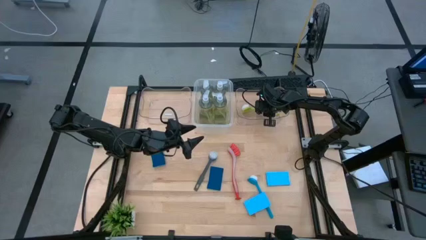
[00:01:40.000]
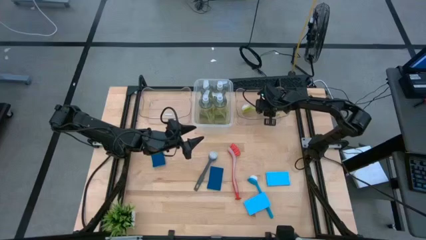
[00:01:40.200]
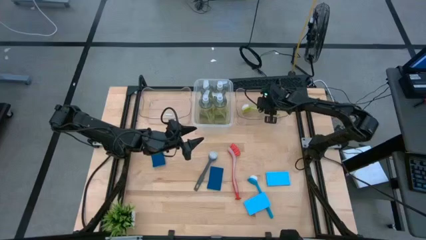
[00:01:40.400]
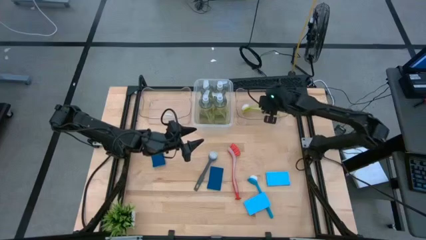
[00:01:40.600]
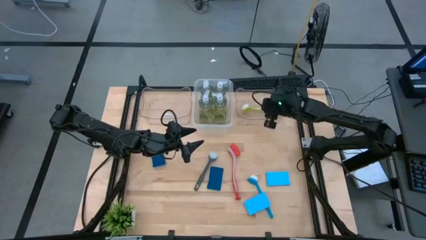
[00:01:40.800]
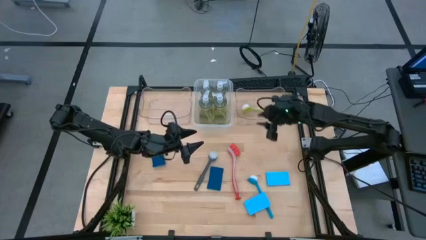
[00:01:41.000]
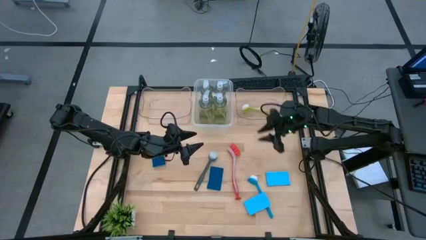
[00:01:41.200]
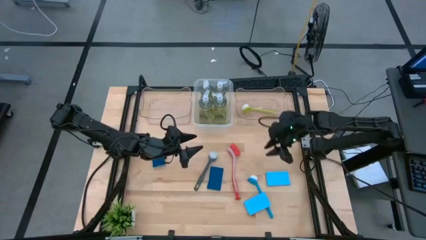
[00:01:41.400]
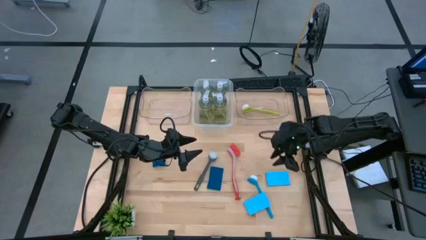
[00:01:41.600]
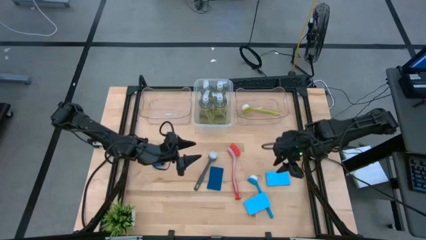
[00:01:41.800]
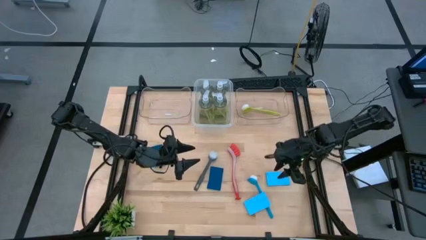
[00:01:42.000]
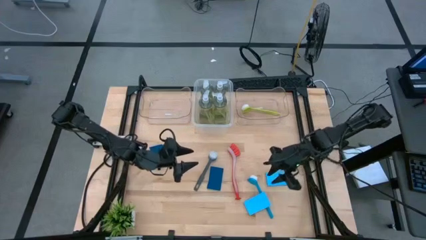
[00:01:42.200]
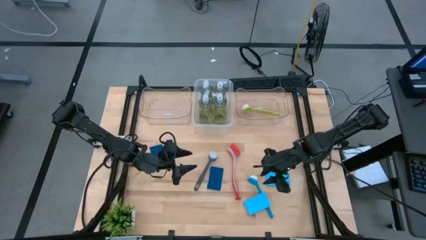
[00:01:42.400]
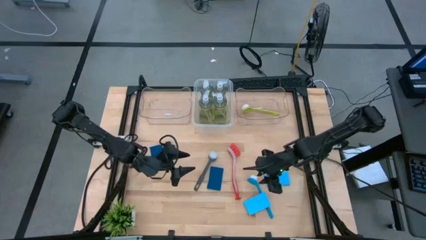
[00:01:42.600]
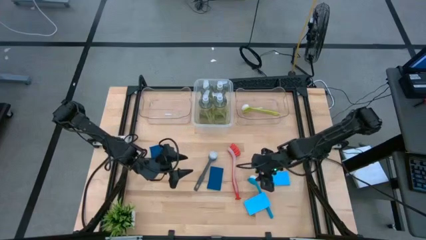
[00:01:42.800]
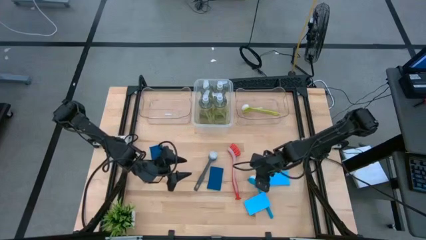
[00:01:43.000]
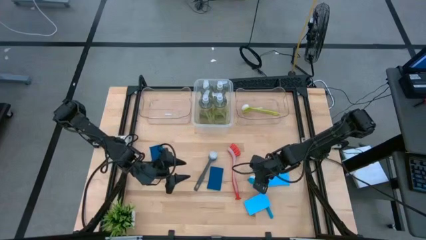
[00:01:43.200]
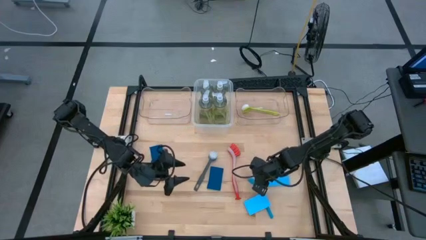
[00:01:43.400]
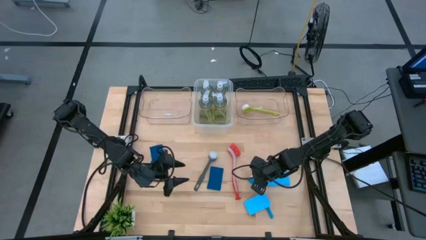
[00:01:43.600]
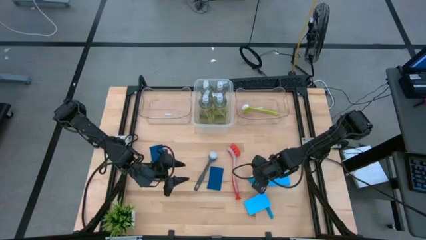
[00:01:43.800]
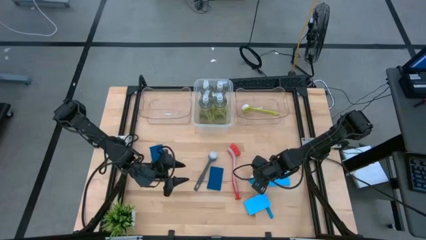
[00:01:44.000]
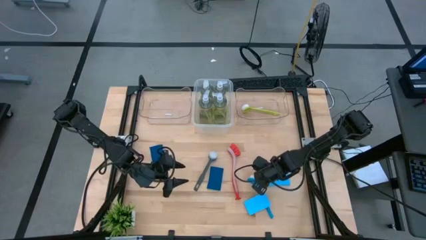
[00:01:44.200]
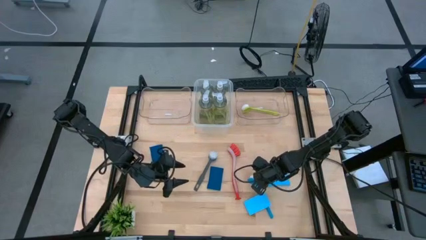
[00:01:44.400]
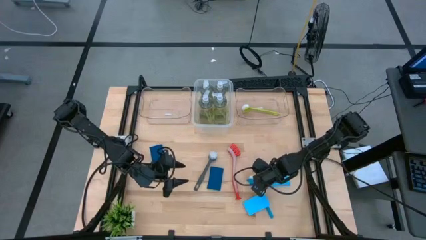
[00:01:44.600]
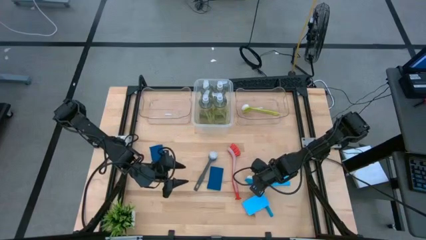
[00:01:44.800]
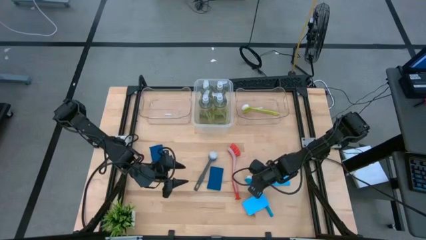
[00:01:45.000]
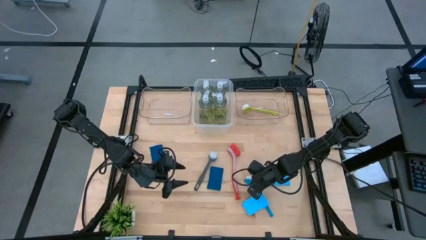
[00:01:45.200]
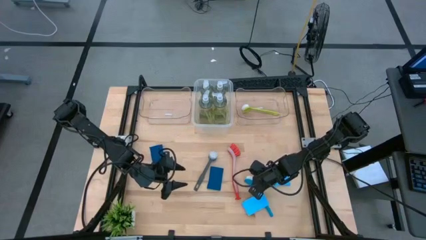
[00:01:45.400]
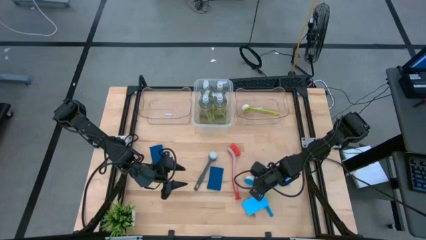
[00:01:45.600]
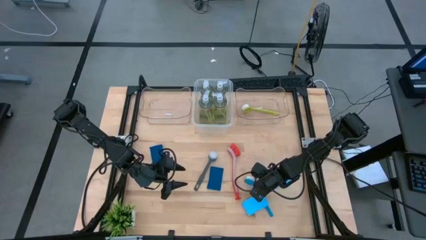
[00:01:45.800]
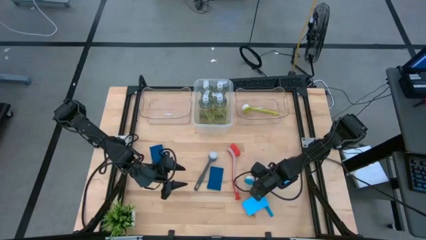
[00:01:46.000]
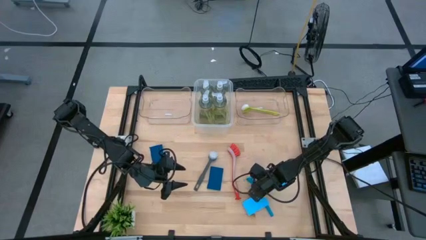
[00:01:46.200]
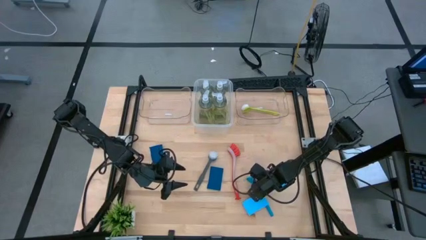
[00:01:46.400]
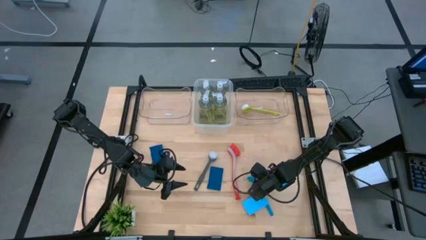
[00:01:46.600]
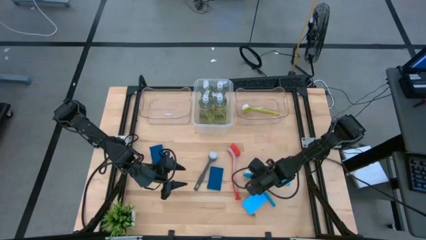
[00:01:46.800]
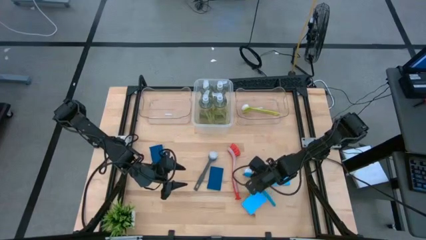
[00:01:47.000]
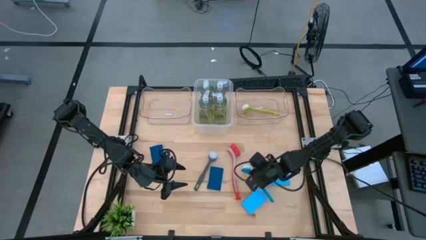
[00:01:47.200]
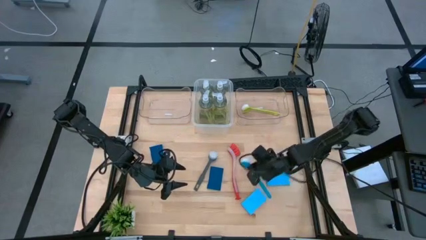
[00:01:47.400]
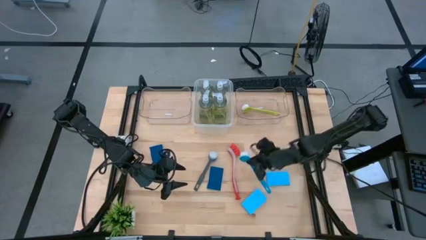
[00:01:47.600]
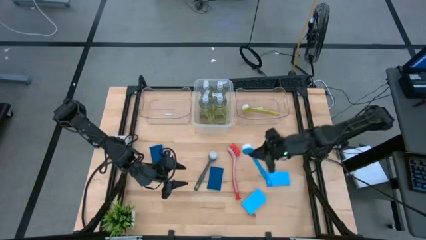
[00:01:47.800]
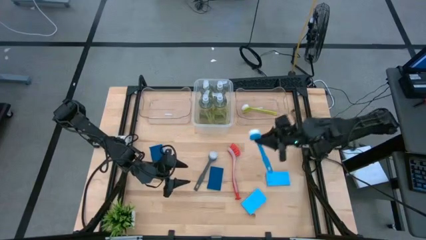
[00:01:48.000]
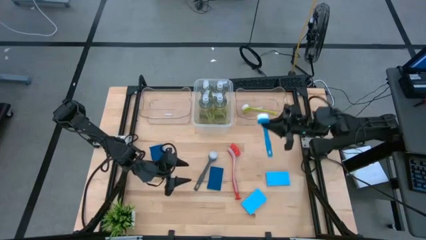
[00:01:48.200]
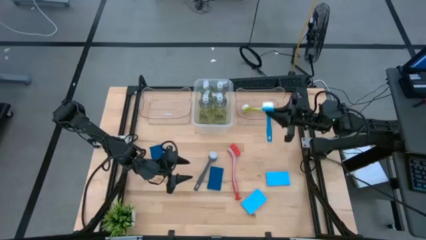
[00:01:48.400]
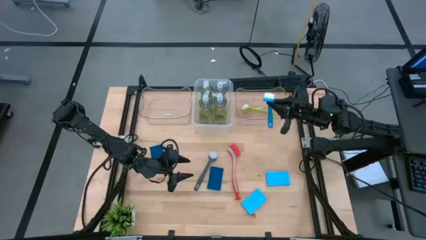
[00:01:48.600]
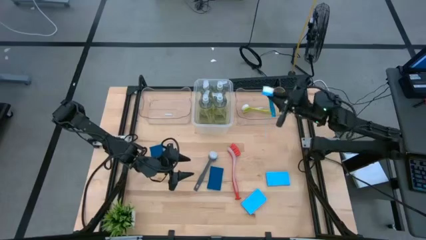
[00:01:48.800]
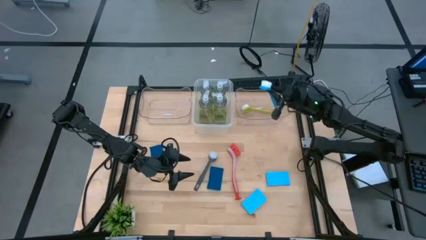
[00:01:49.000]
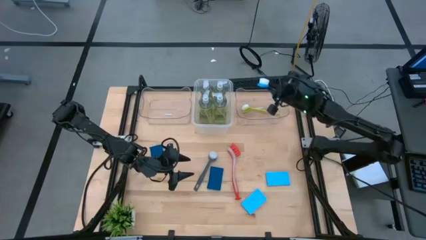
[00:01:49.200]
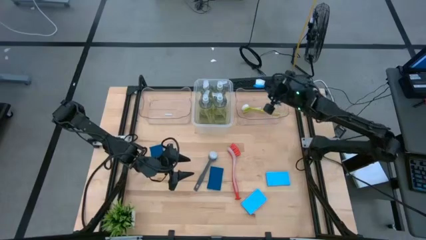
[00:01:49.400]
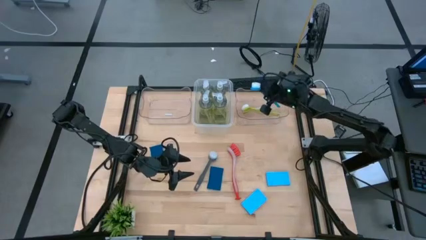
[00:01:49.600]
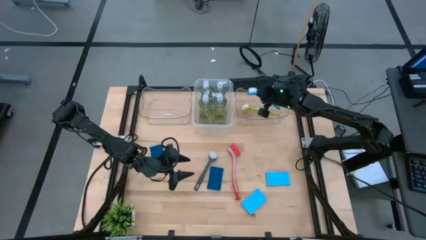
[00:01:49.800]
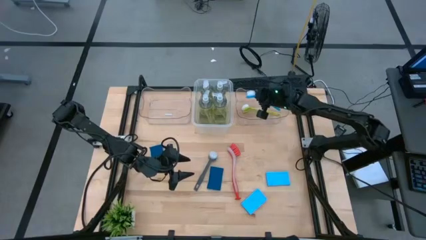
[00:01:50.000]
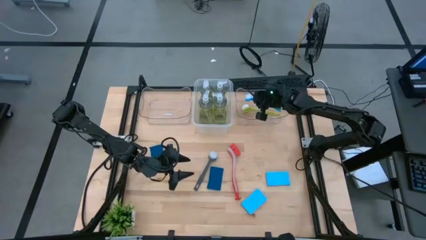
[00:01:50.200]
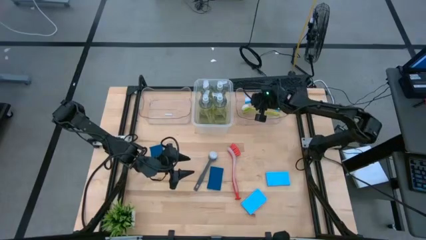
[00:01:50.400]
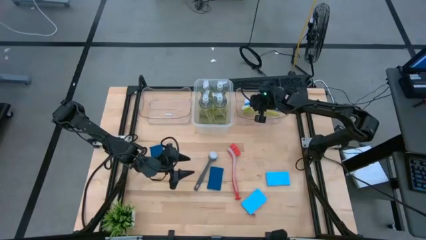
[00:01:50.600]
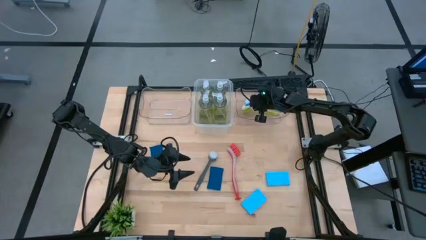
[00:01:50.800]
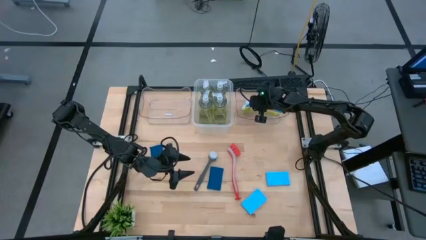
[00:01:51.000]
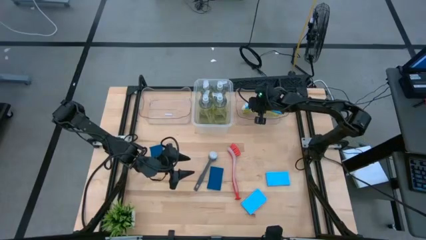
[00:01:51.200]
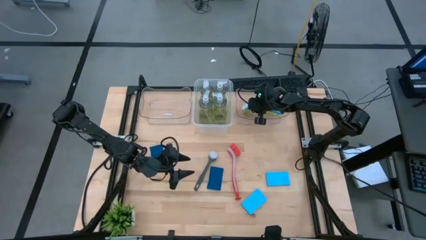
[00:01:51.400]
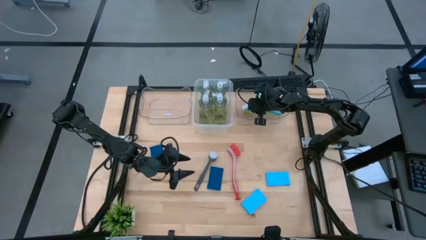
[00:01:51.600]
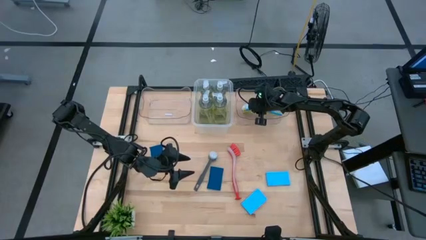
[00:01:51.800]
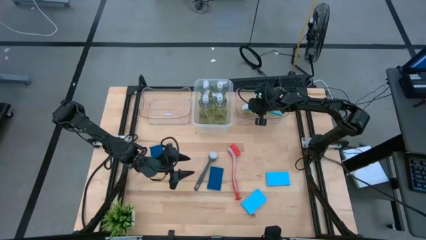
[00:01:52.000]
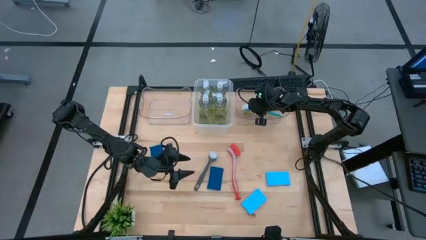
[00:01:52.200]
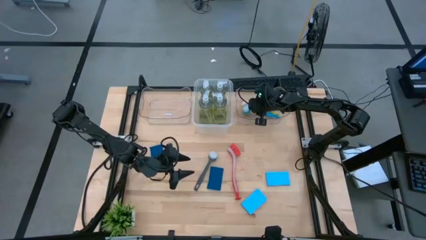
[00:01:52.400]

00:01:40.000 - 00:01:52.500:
Task: Pick & Place Kitchen Sink Supplies
Put the blue dish brush into the right transparent bin

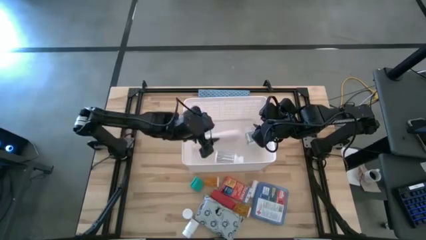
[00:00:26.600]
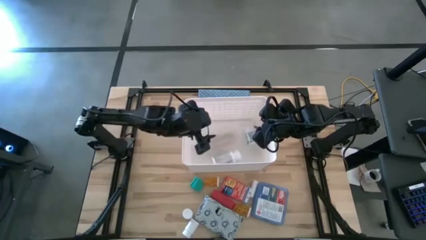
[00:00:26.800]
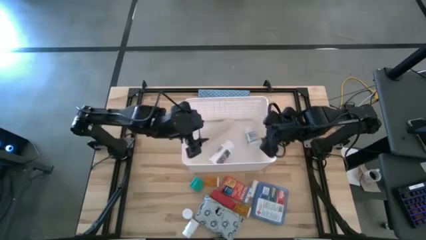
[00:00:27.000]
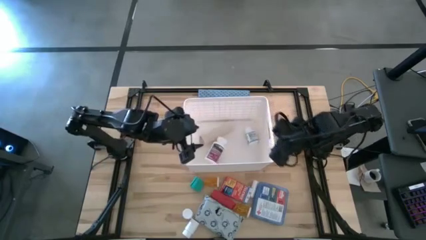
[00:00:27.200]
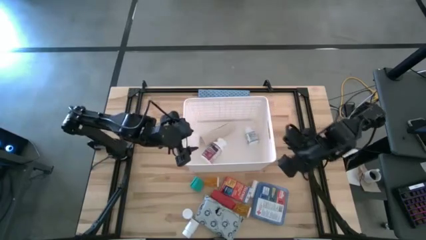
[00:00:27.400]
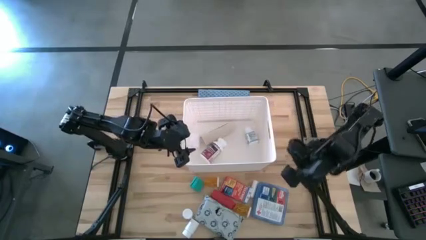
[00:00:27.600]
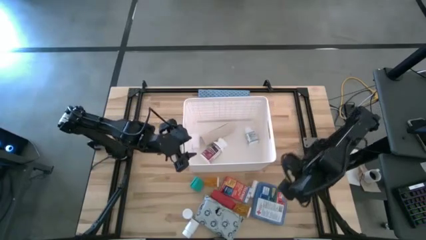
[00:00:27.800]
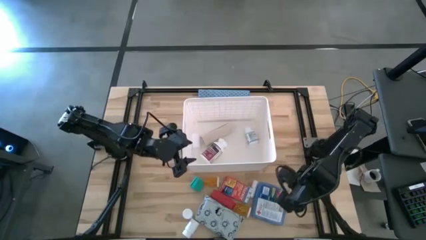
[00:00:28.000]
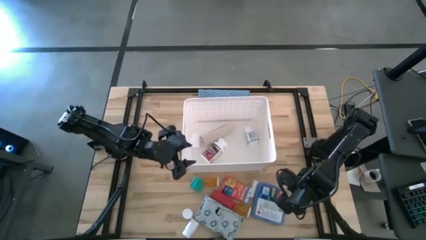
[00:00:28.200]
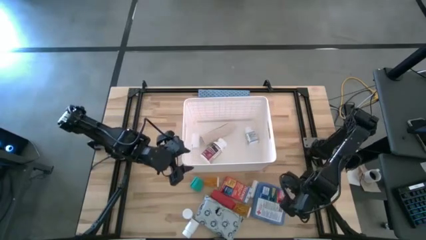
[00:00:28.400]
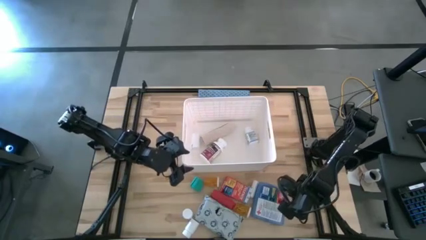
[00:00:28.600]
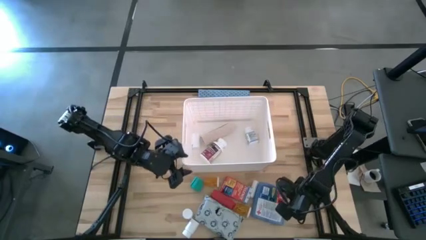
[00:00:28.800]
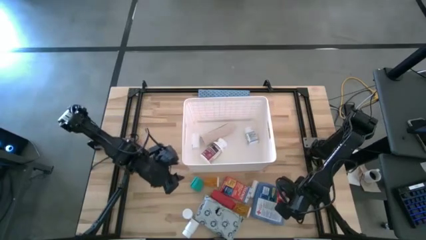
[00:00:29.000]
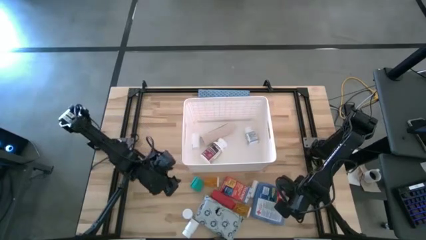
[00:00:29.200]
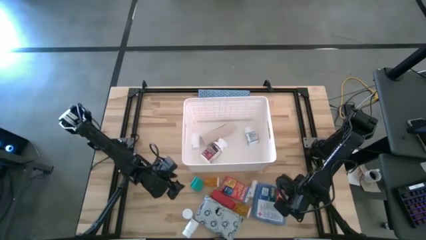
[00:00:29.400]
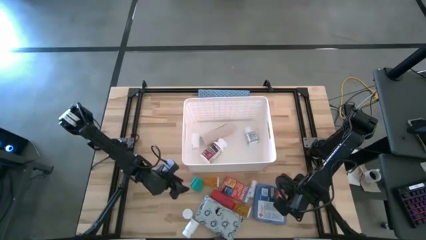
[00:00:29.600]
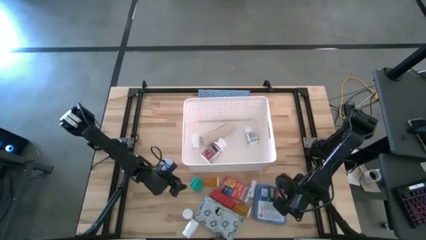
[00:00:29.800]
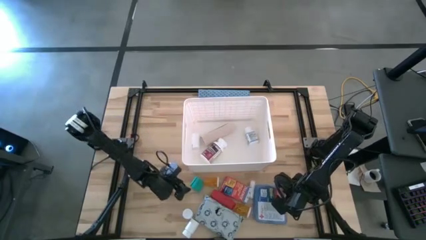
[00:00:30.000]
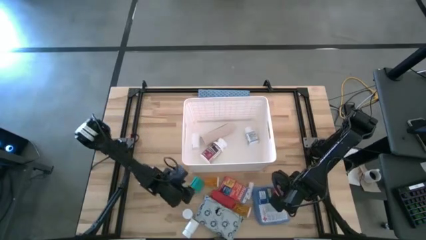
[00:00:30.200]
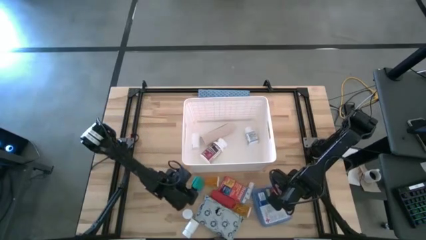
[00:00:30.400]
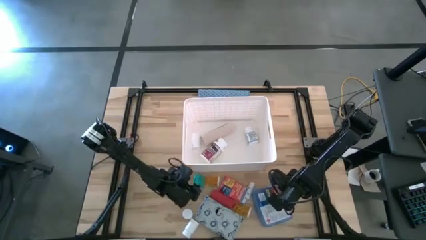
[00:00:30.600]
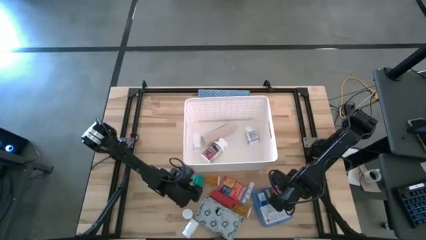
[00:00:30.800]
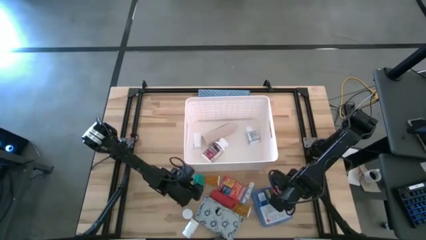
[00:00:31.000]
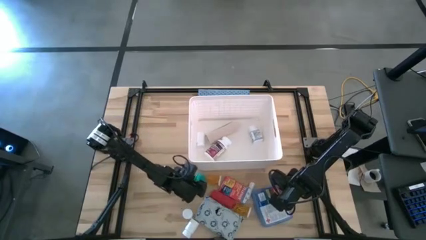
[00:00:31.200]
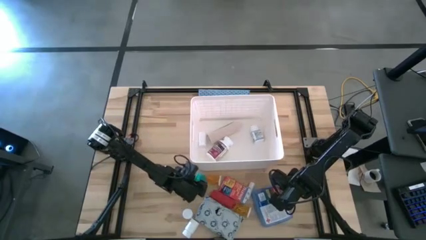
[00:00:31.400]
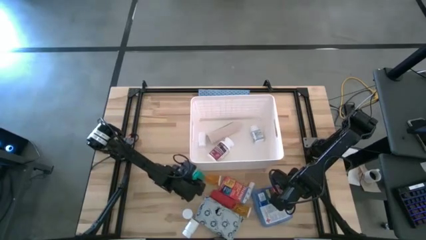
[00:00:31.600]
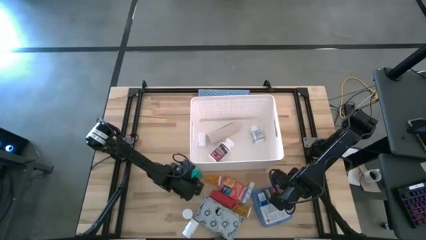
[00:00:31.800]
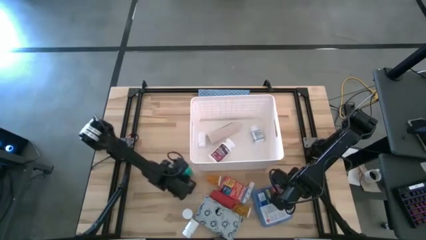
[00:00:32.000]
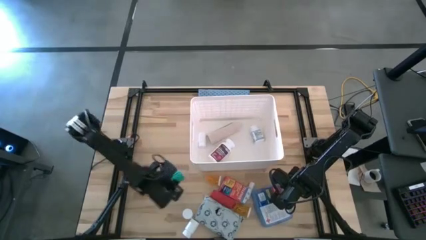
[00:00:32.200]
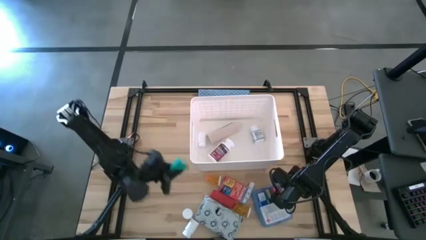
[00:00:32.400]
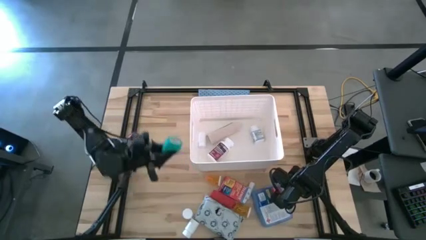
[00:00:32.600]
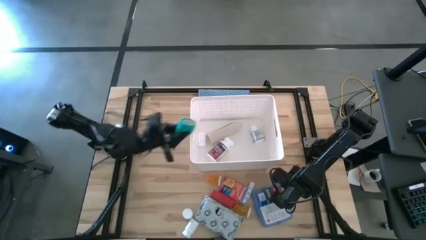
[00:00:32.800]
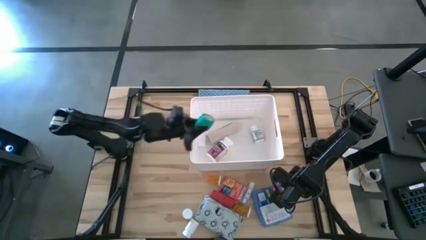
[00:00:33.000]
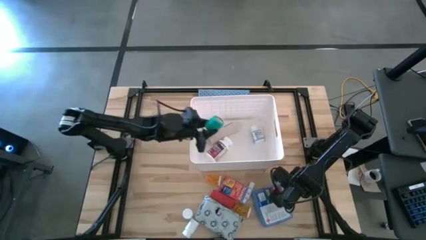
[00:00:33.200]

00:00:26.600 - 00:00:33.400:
Task: Pick & place medical supplies in basket/bin
Put the green bandage into the white bin
